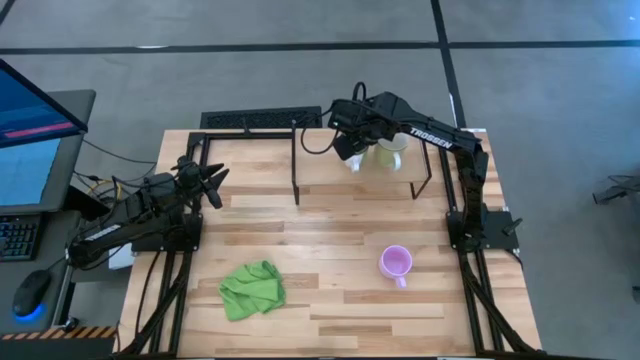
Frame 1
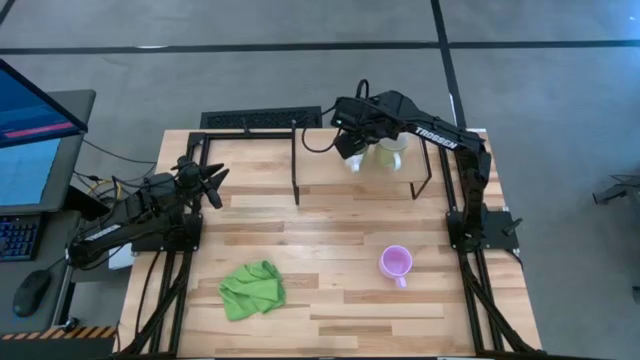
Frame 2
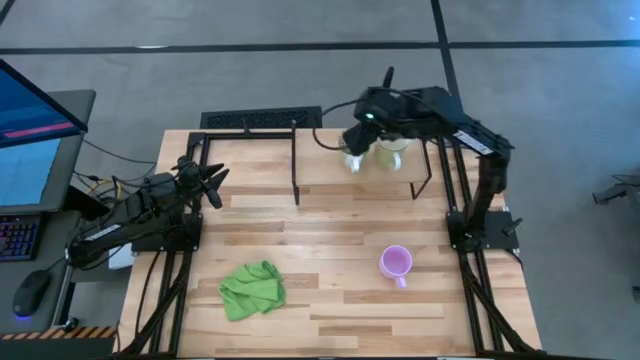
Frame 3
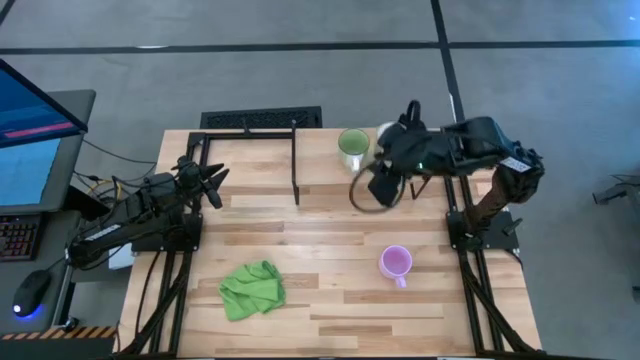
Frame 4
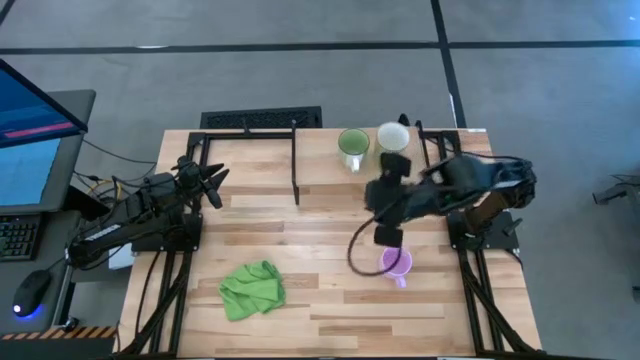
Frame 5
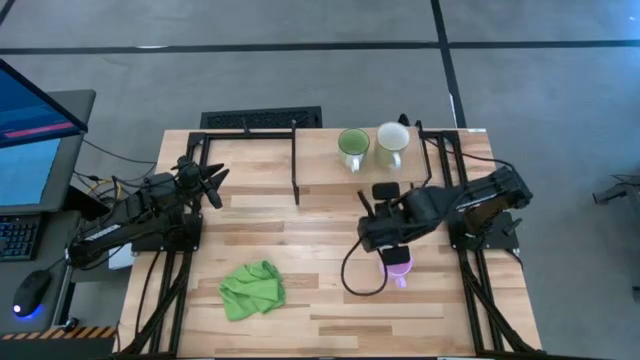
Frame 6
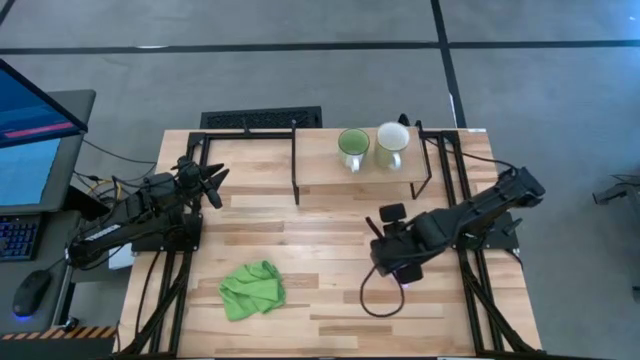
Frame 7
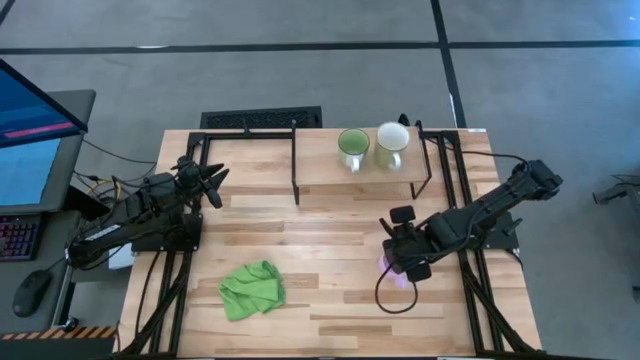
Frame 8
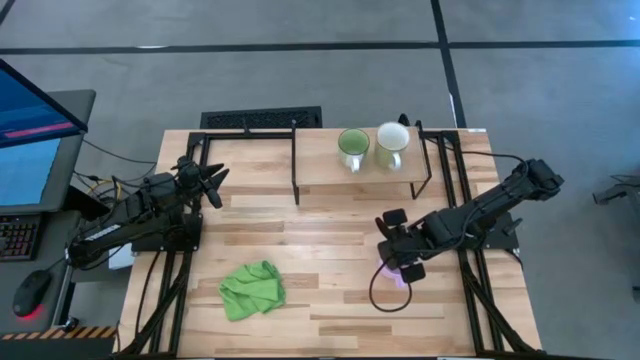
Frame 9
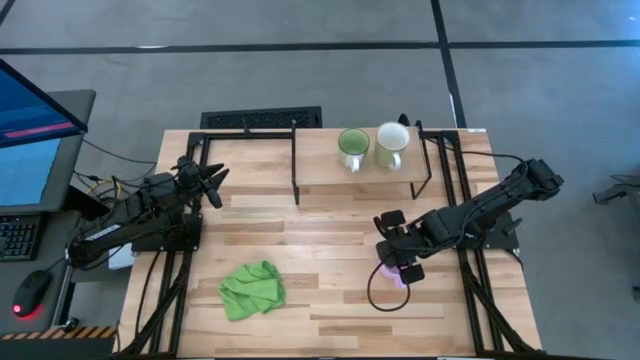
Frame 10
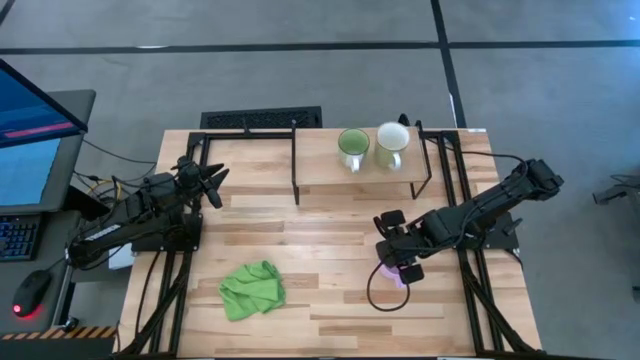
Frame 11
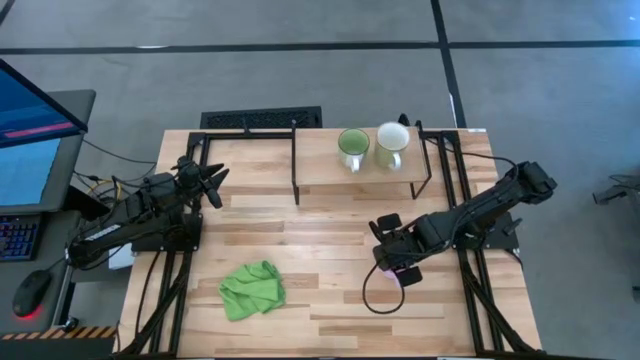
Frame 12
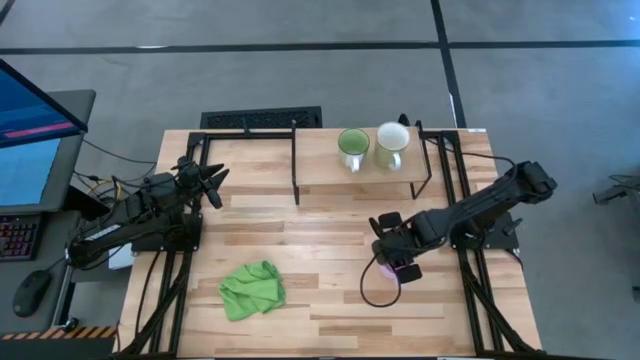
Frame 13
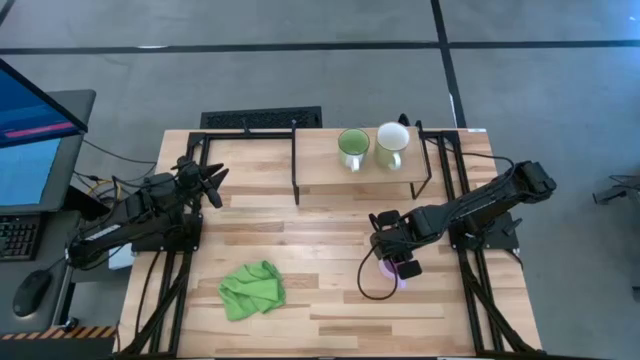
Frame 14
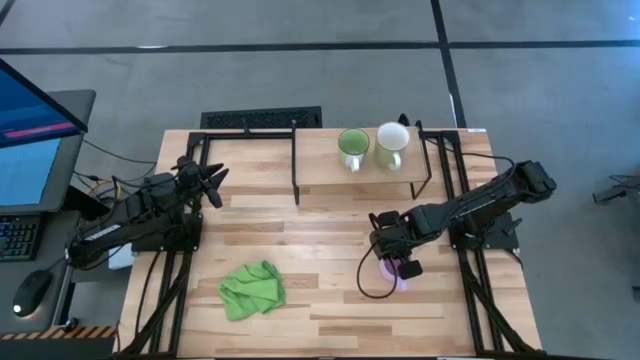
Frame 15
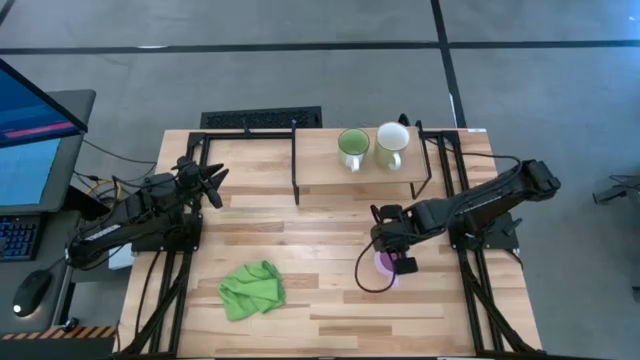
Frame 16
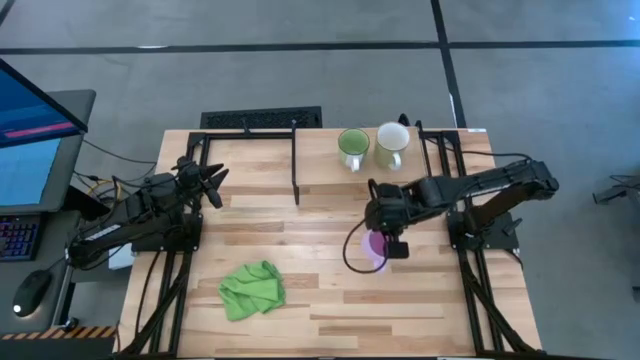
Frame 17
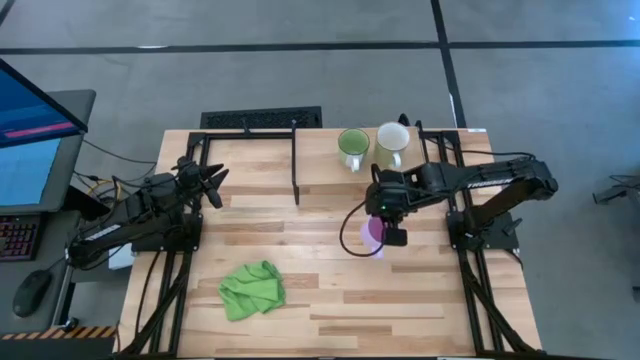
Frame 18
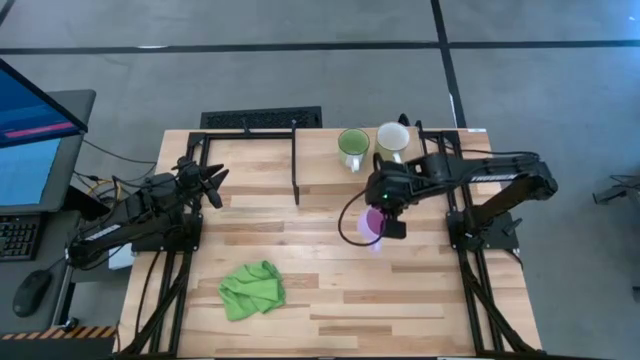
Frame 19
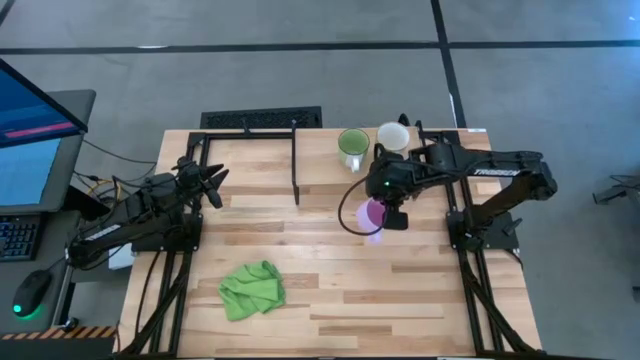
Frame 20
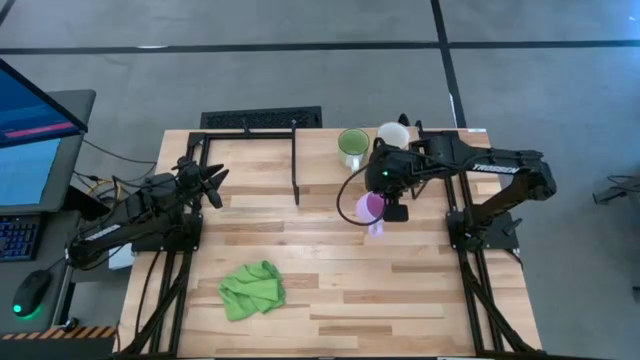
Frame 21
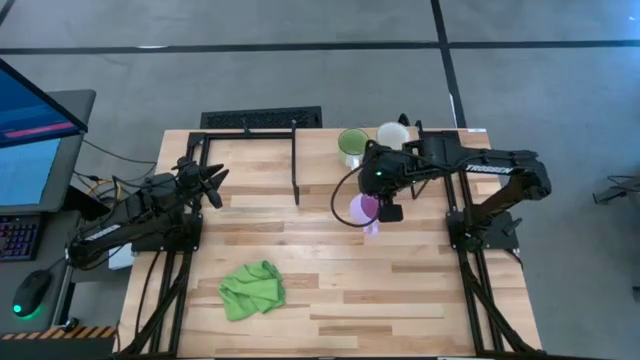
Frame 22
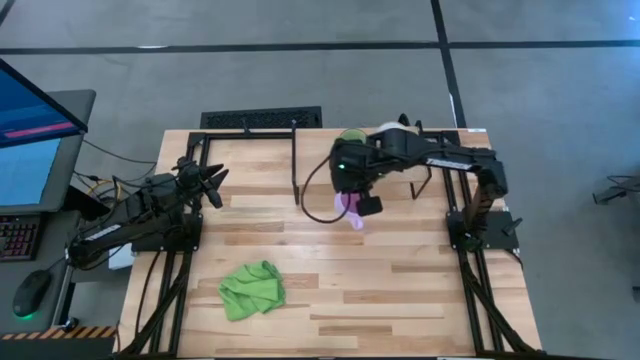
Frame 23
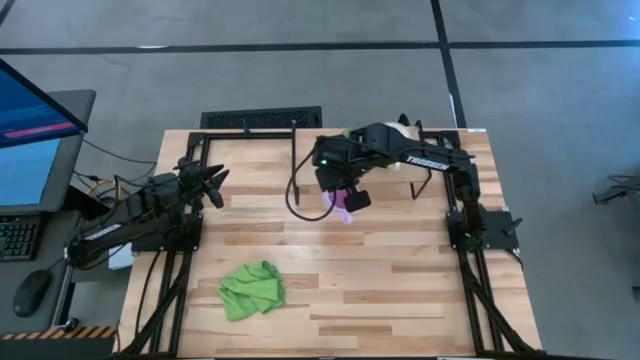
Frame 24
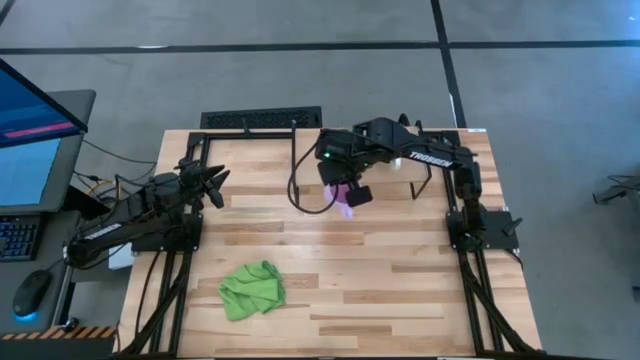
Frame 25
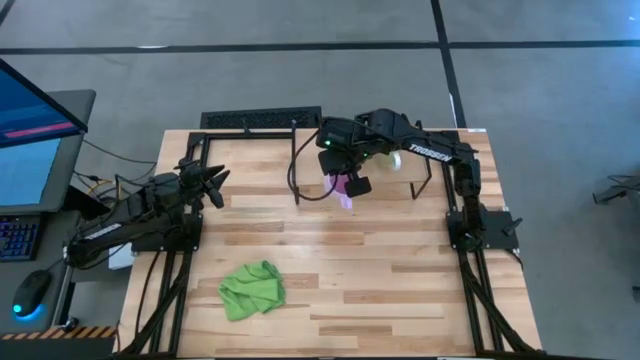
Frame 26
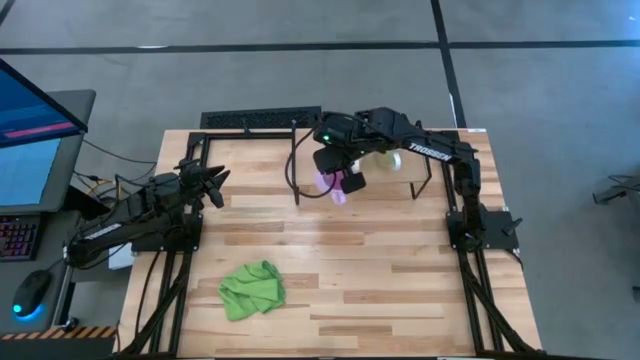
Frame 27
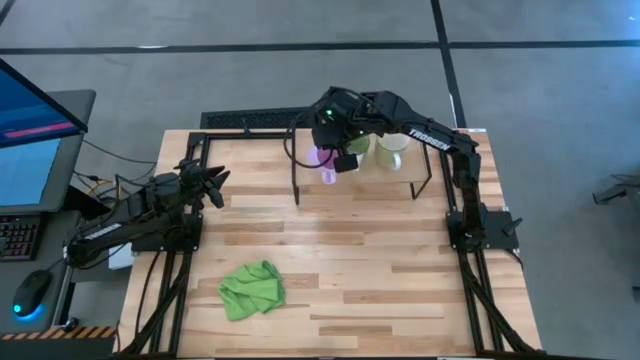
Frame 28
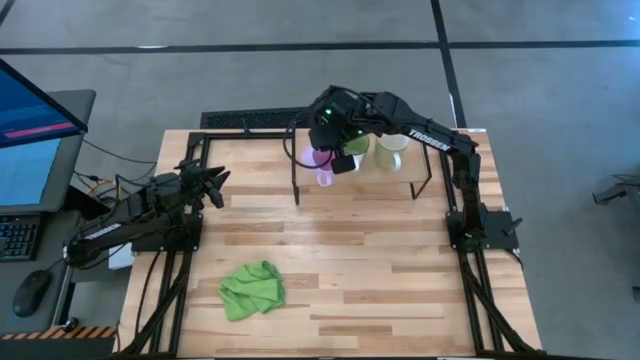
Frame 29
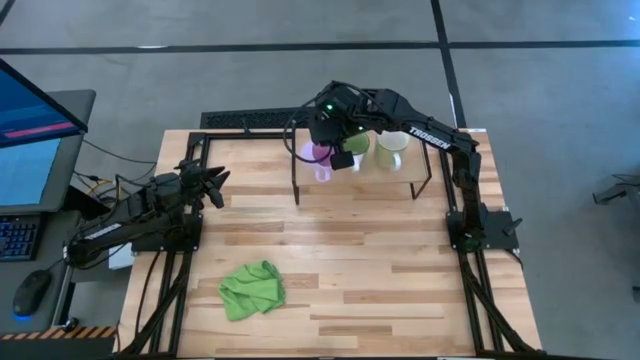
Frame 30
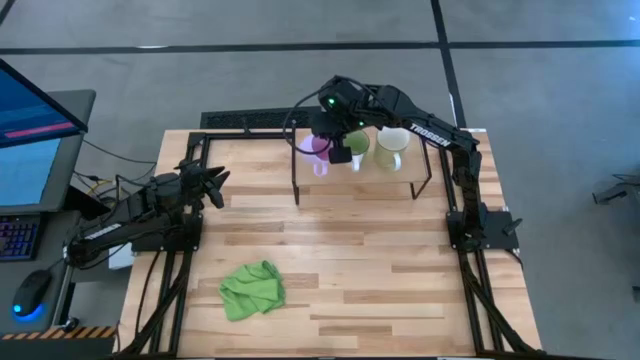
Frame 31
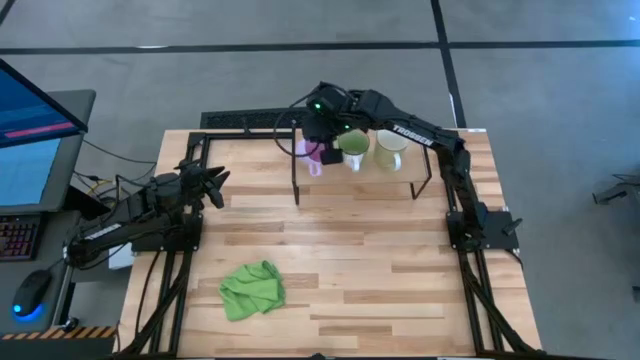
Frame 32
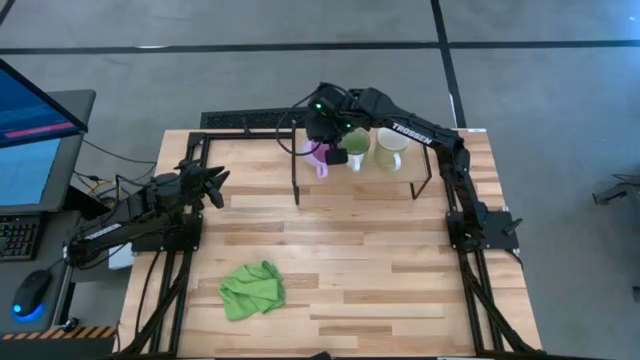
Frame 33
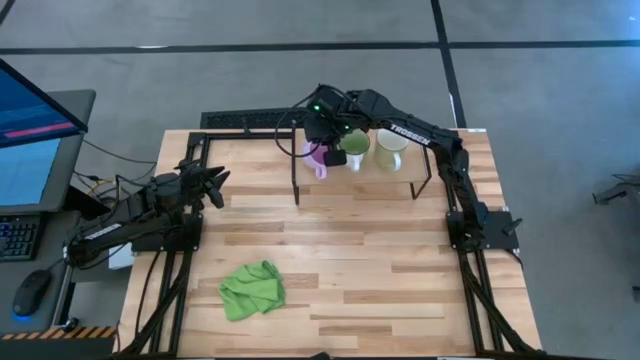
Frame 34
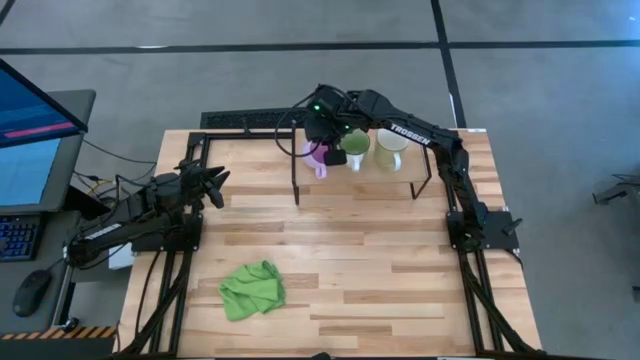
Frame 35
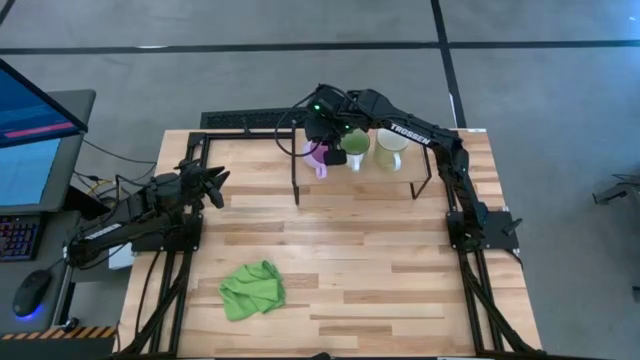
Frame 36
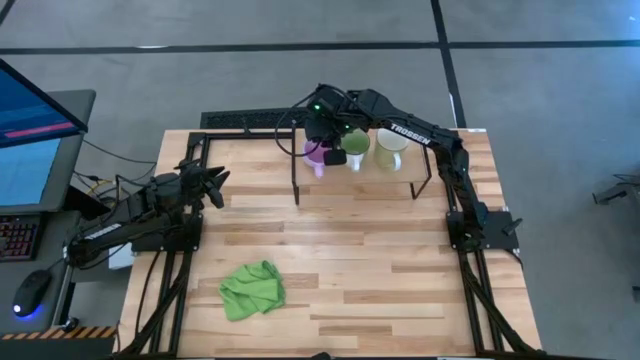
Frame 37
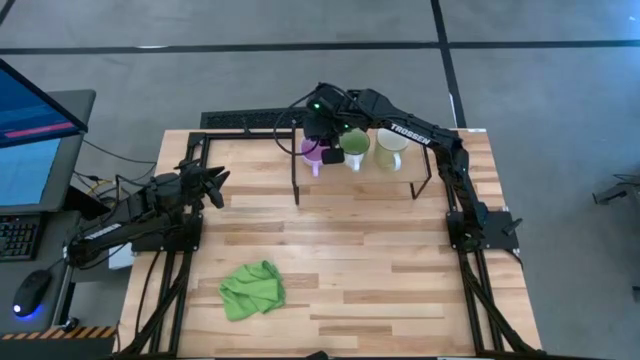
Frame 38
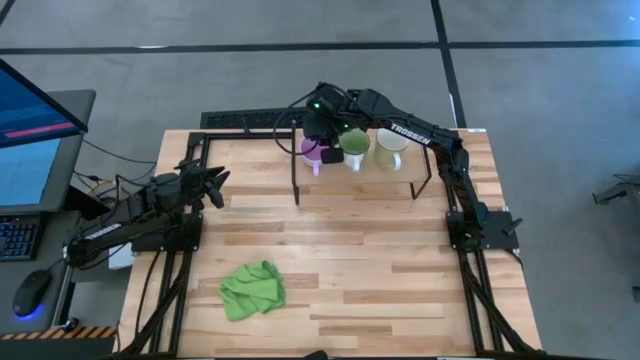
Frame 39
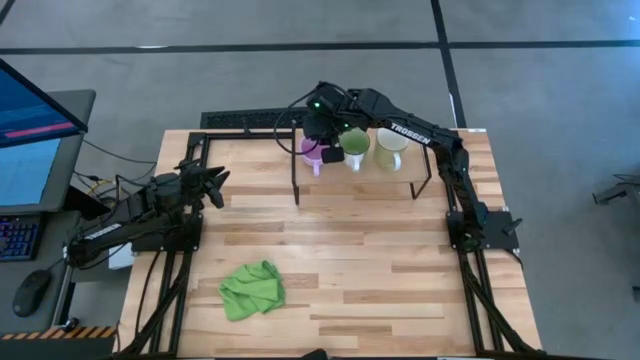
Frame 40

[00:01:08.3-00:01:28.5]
Task: Stack small to large cups/mugs on shelf
Put the pink mug on the shelf
